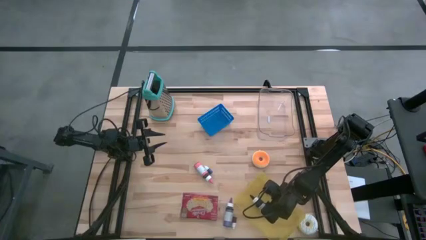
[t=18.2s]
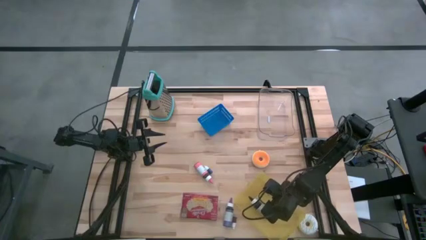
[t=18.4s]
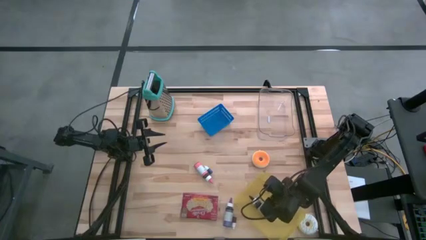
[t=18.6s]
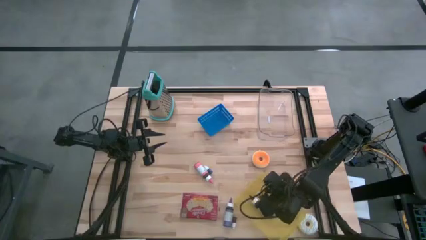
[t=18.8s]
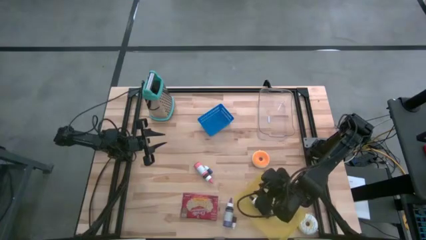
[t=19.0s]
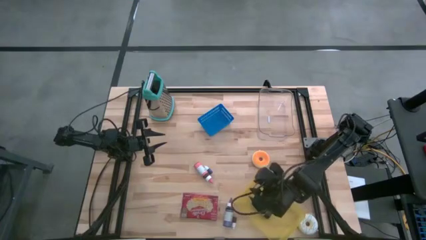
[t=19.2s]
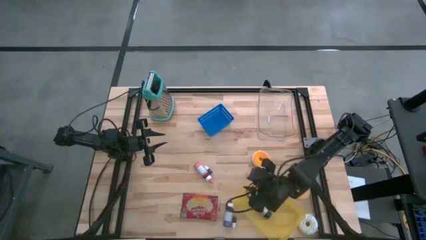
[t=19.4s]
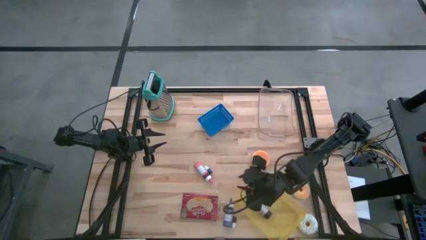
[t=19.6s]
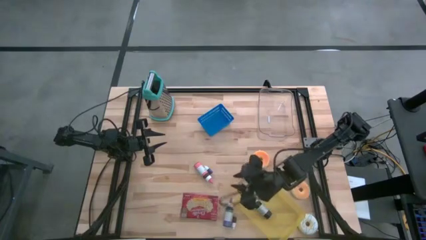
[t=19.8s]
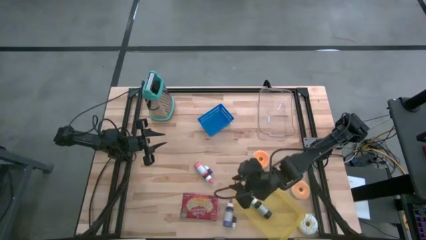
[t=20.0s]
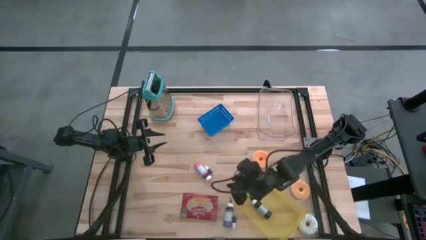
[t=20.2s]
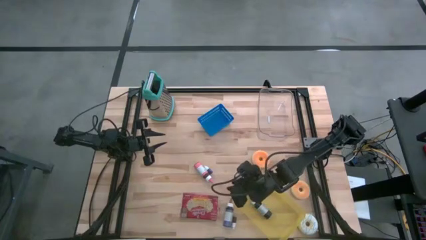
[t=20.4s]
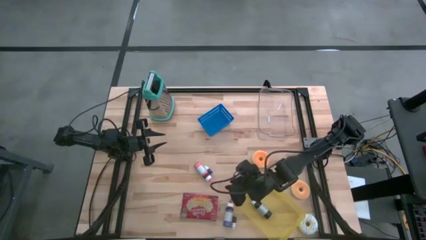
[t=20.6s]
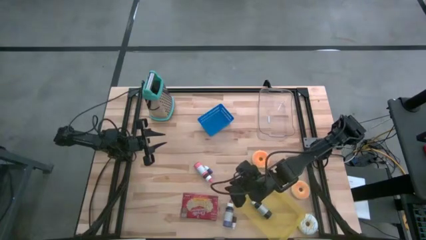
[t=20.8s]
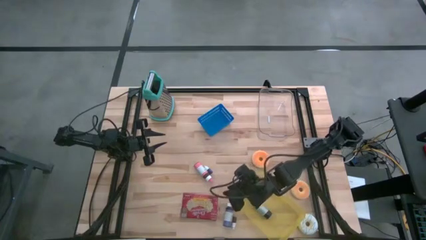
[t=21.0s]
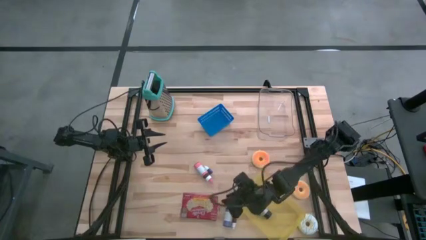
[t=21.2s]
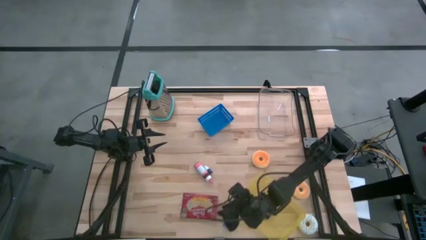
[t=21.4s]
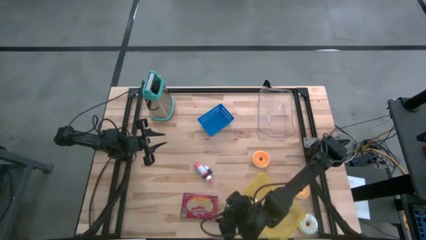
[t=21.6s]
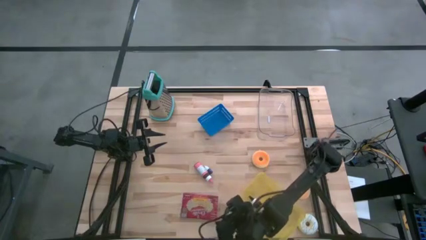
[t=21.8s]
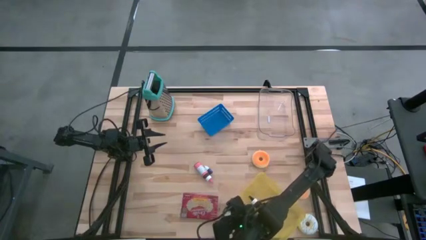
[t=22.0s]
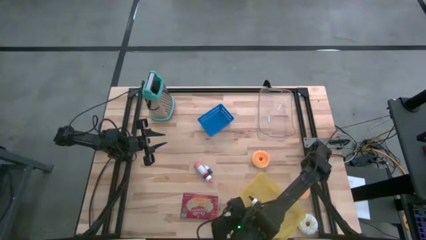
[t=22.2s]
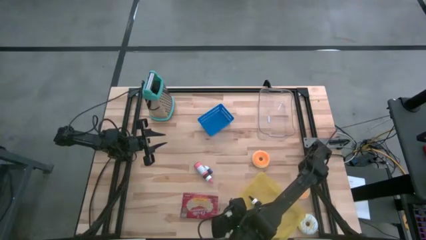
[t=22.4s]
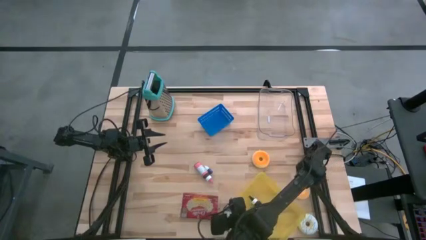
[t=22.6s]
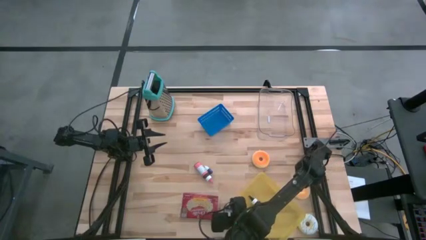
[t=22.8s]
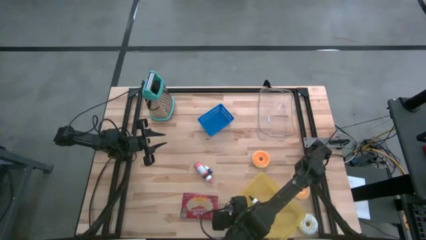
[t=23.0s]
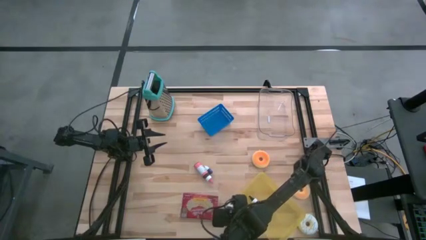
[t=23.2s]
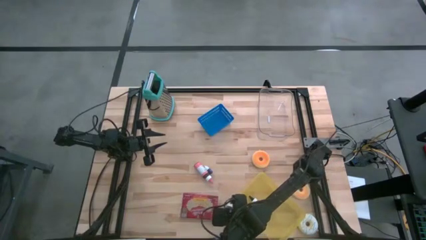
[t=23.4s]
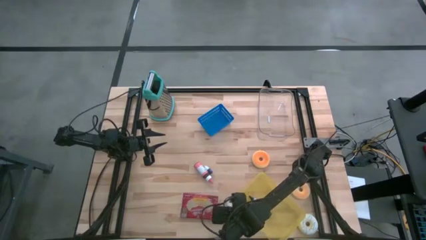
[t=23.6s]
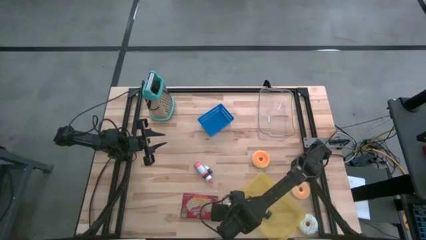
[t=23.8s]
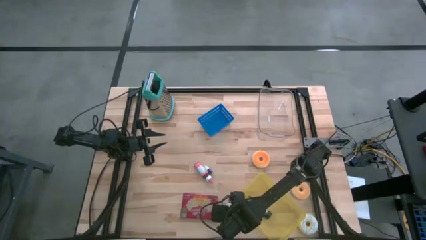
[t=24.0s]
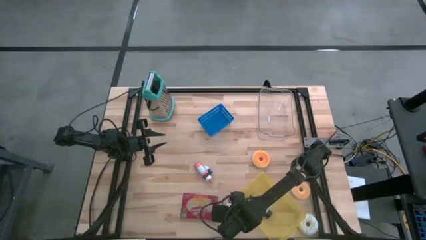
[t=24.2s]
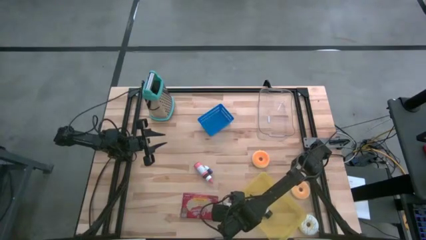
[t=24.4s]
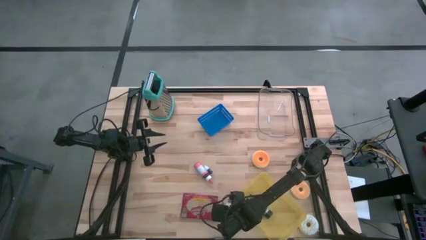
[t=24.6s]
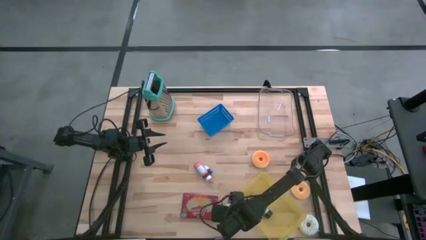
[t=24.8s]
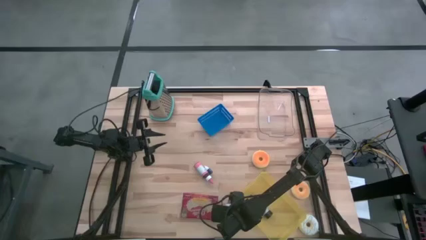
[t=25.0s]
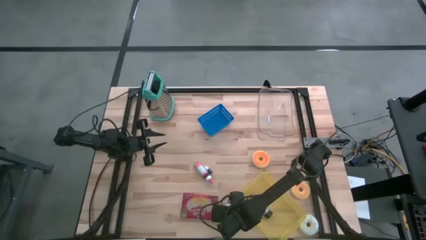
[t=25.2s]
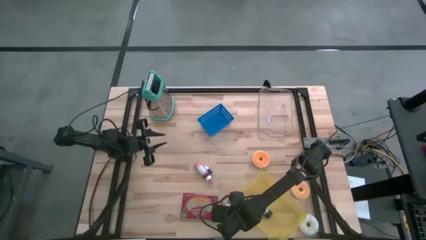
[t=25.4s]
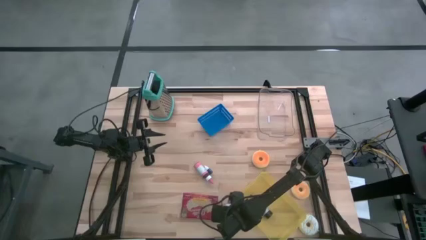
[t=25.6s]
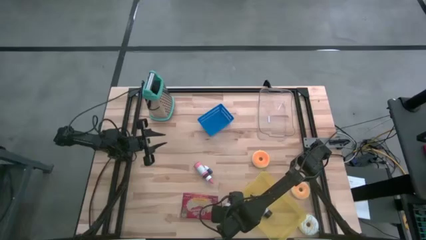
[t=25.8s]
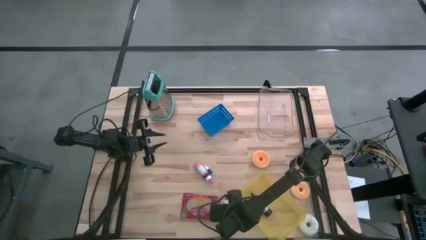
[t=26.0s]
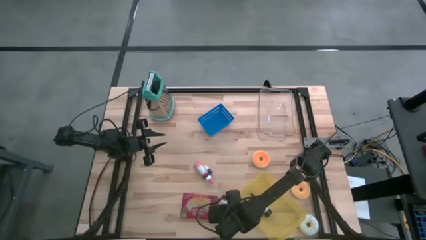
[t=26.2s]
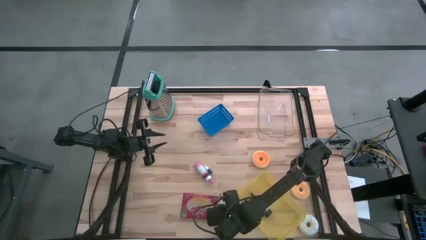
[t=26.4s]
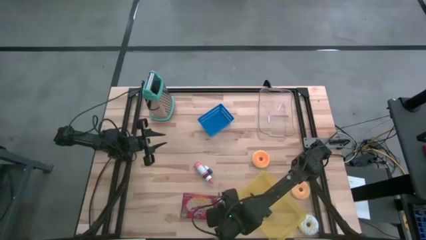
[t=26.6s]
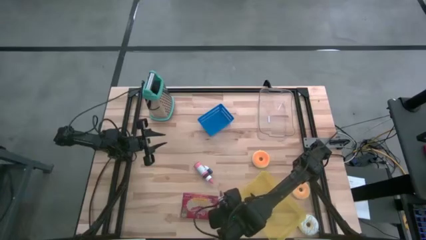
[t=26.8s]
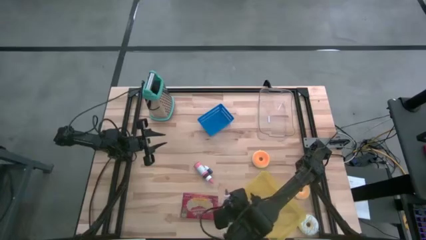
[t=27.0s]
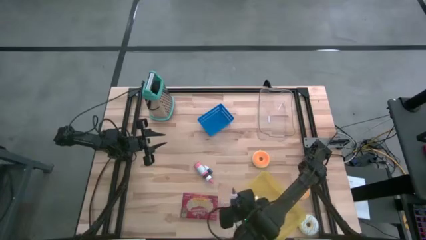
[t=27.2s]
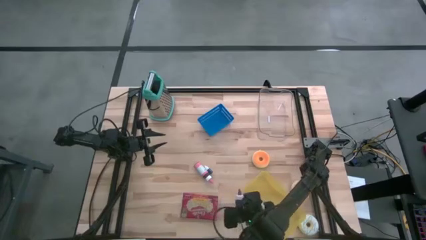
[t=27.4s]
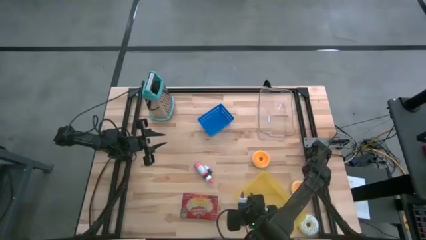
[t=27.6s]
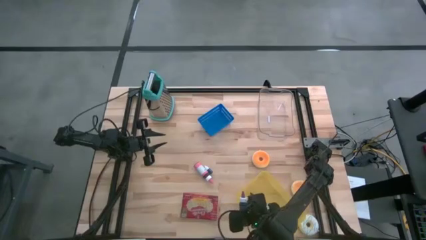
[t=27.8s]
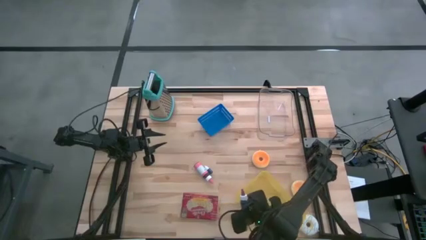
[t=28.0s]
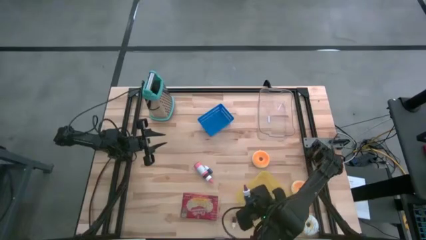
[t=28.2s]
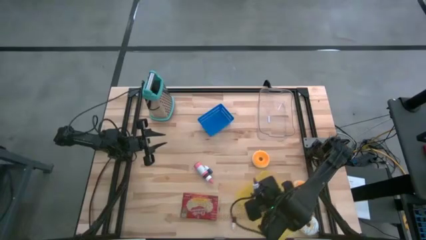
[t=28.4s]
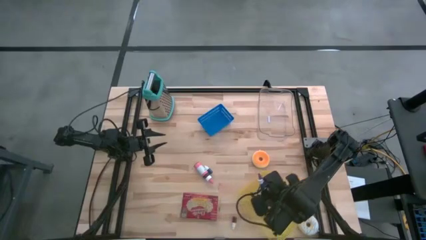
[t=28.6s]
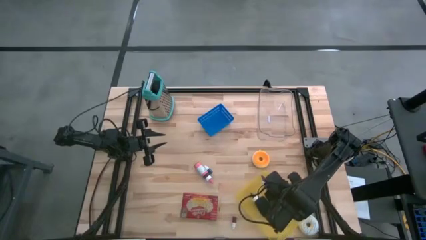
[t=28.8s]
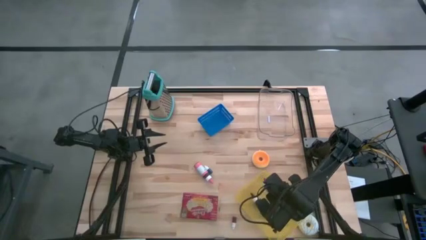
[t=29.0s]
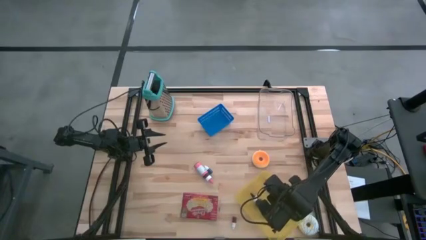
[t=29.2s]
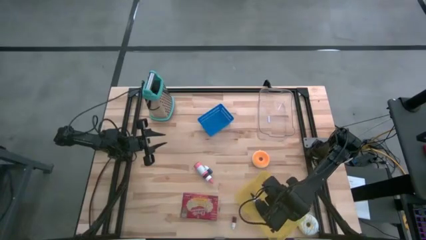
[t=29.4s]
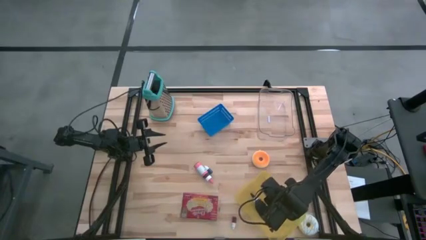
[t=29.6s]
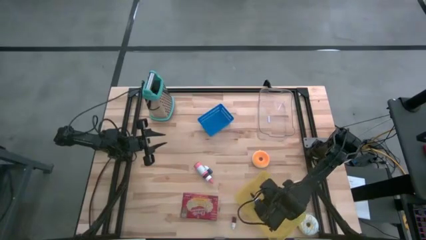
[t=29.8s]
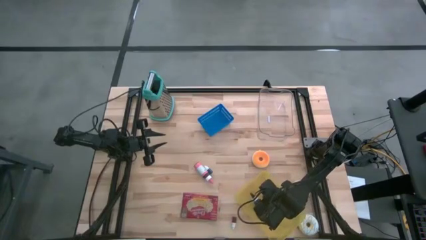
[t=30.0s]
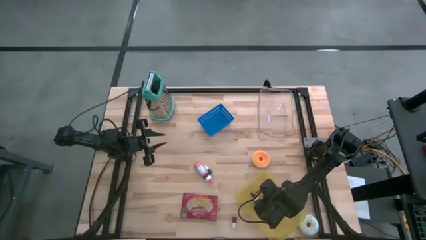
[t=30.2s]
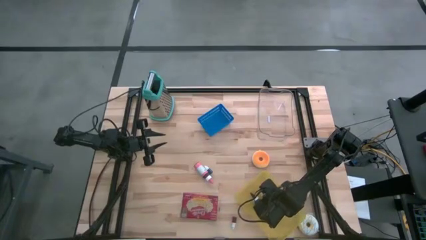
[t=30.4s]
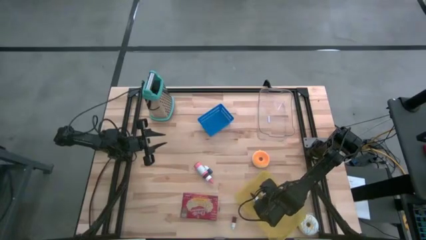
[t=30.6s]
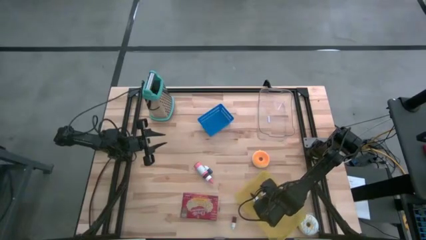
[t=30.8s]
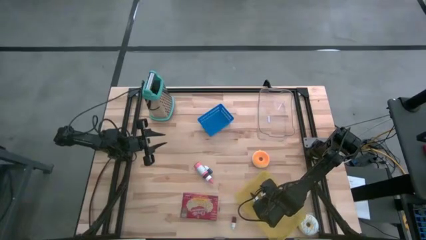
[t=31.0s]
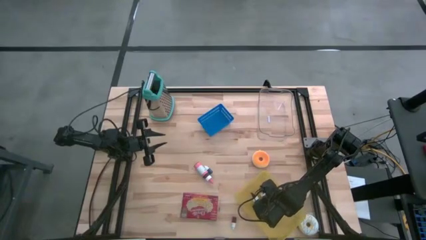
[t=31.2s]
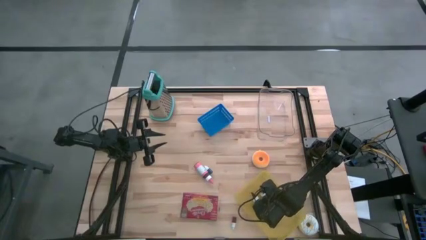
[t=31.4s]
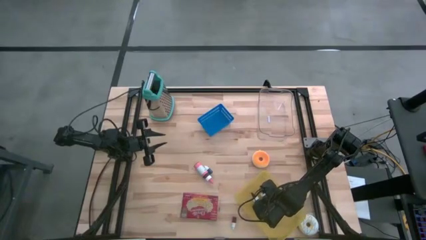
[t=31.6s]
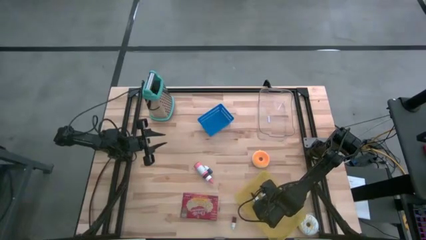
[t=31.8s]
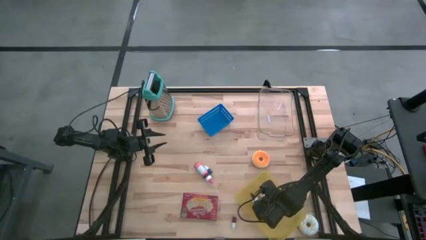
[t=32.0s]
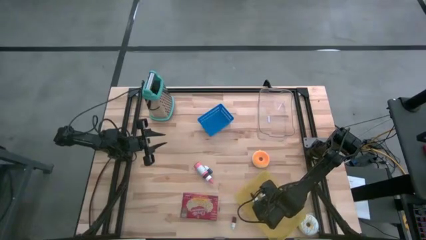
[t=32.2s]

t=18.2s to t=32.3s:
Task: Pick & Place Food Item
Put the big purple food coloring into the yellow bin

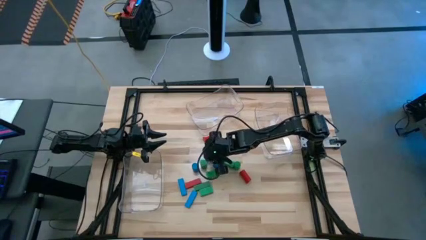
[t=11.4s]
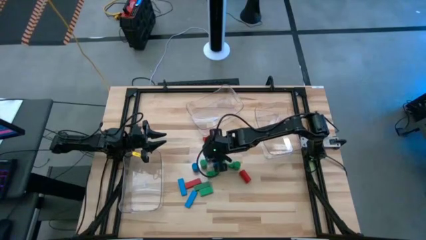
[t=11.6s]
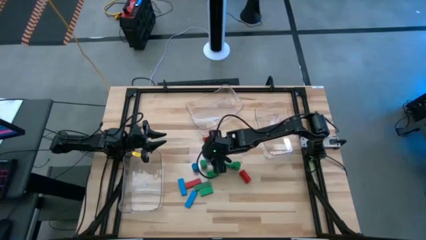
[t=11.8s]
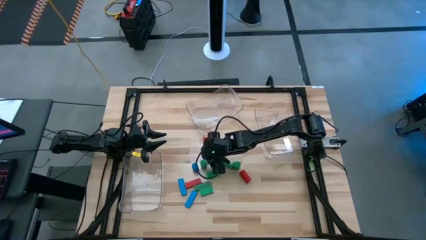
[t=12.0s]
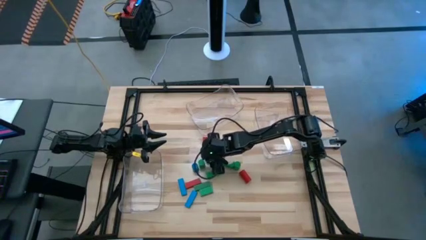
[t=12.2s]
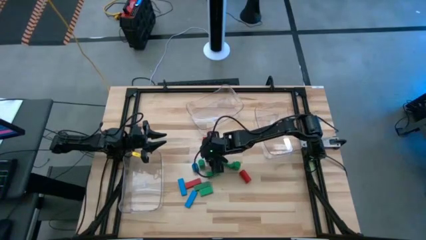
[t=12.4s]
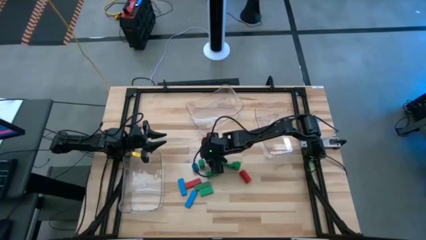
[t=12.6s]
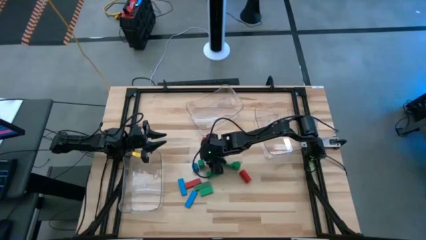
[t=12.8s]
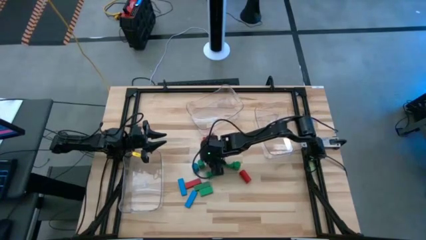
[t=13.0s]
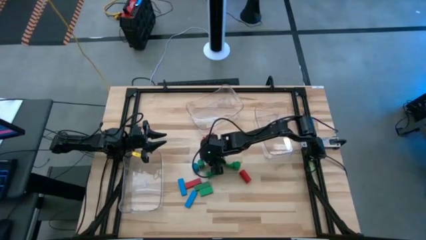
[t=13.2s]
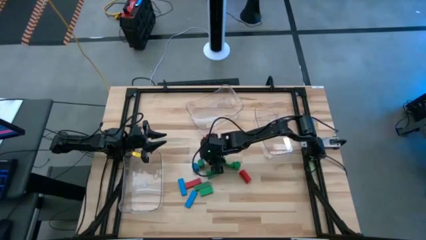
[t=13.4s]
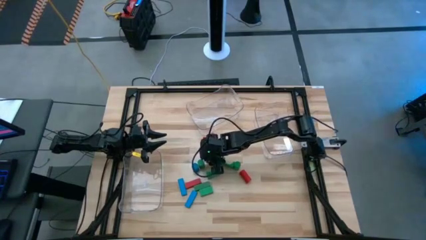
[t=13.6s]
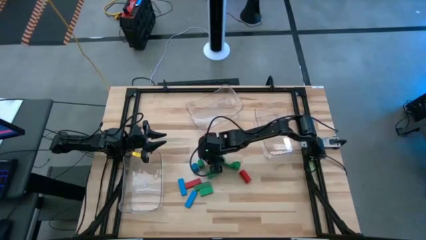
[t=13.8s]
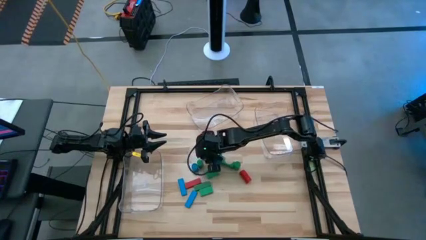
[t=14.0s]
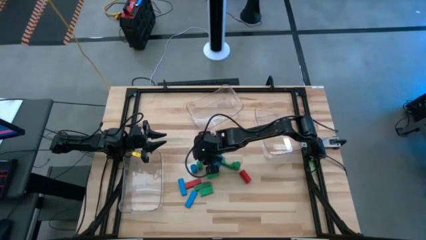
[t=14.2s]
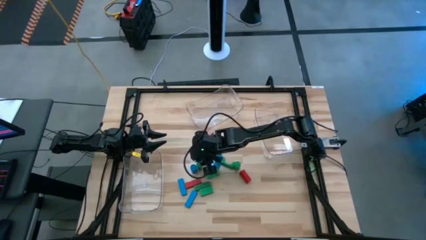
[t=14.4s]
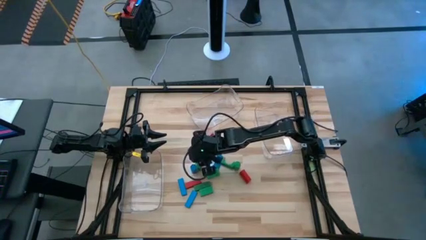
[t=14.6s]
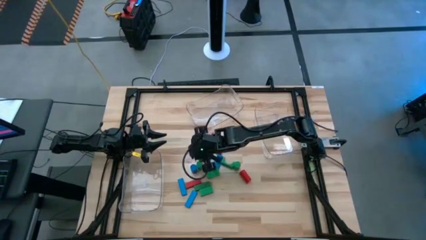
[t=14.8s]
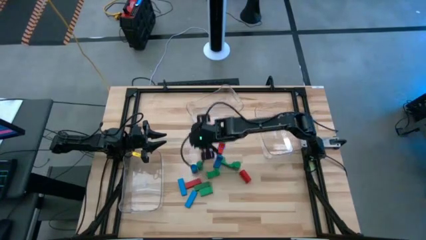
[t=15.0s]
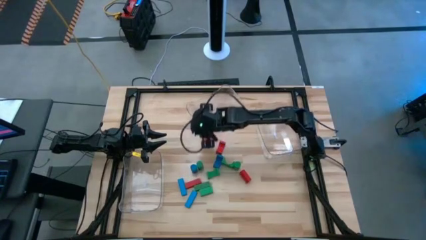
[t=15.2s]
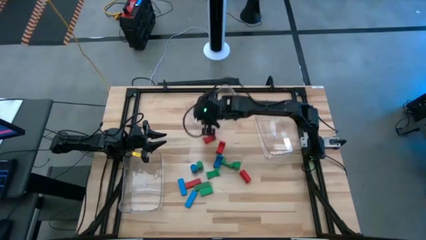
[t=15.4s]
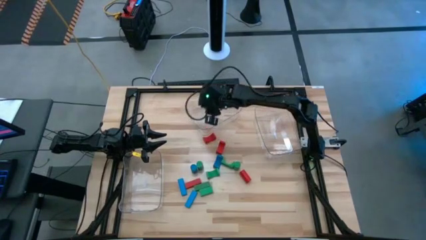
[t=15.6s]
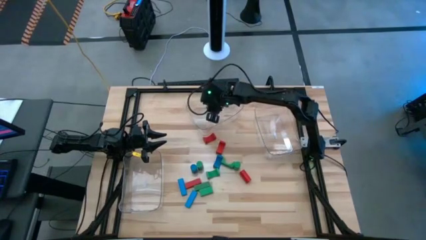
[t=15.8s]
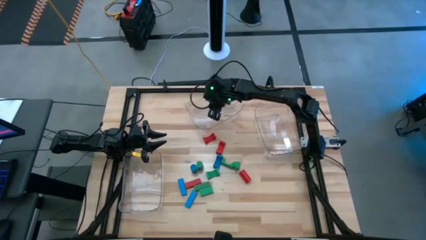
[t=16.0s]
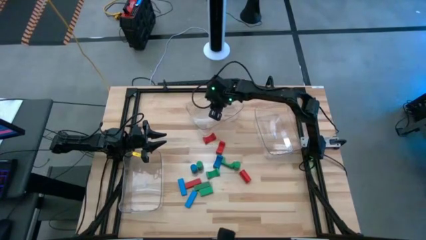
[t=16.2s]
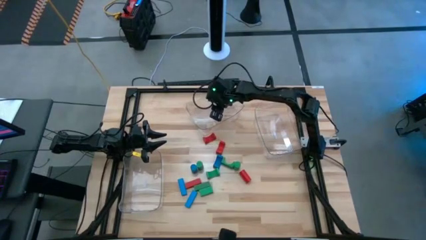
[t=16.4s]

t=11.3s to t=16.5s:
Task: Sort blocks by size
Put the right blue cylinder block into the top transparent bin
